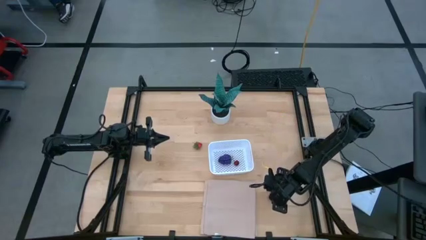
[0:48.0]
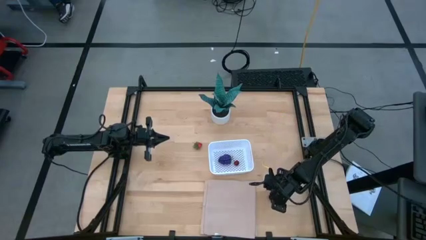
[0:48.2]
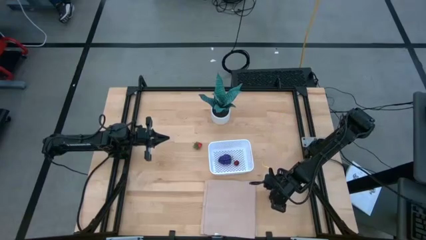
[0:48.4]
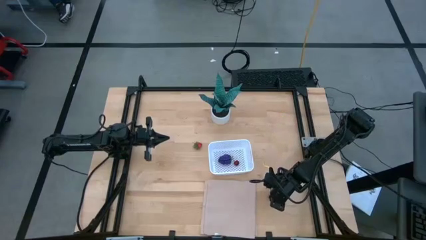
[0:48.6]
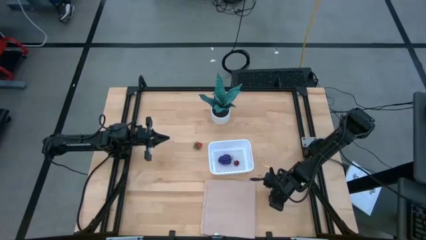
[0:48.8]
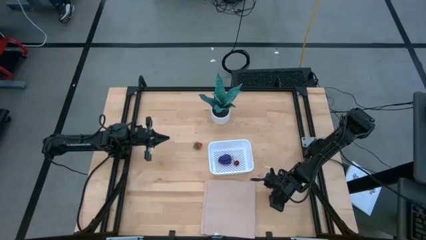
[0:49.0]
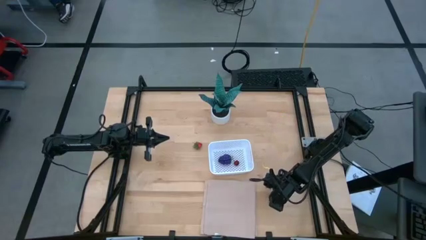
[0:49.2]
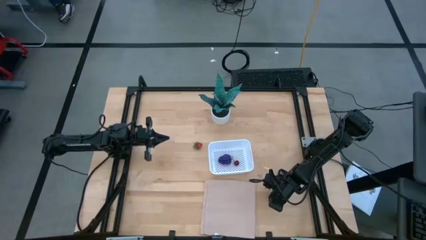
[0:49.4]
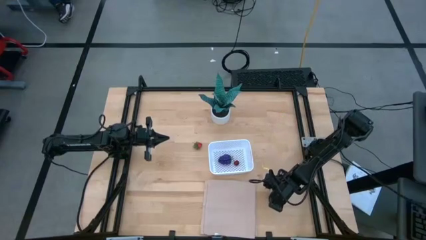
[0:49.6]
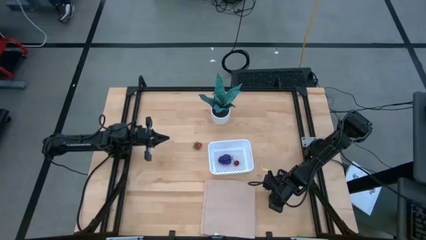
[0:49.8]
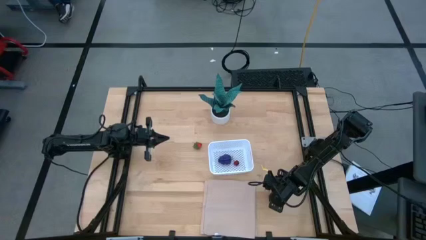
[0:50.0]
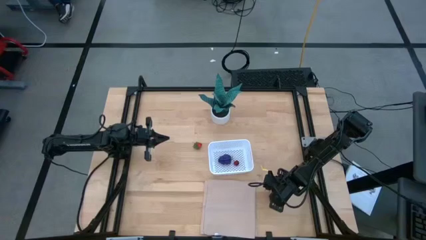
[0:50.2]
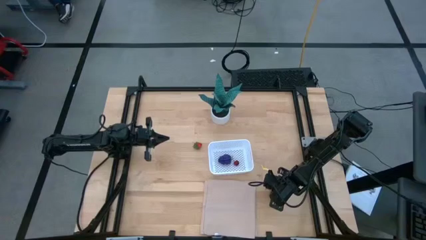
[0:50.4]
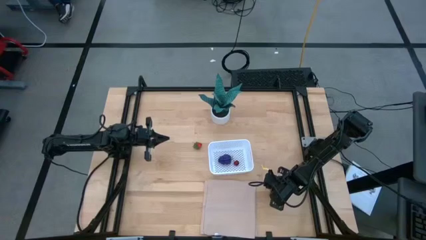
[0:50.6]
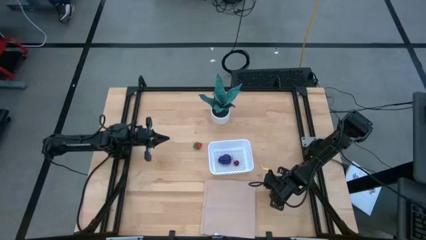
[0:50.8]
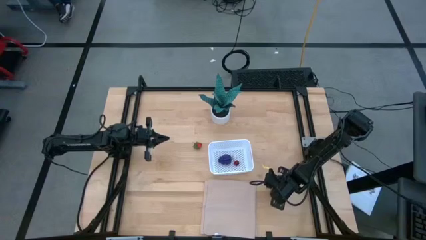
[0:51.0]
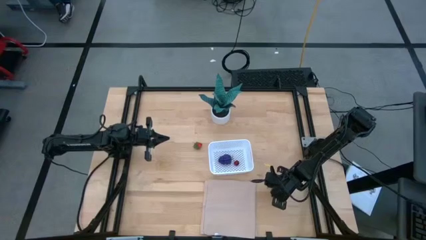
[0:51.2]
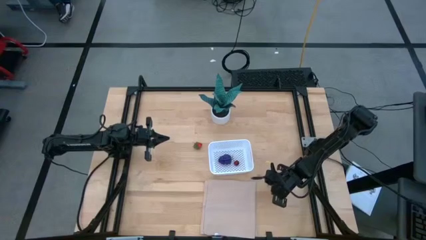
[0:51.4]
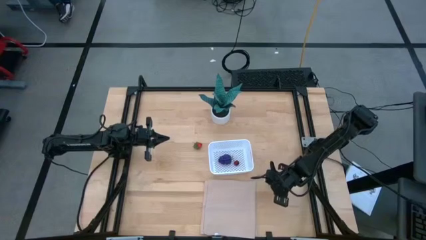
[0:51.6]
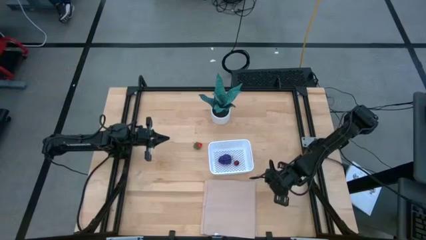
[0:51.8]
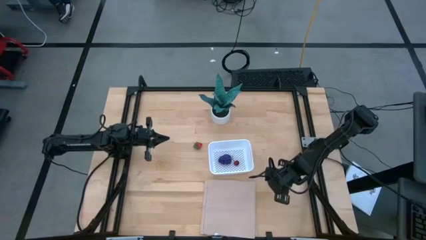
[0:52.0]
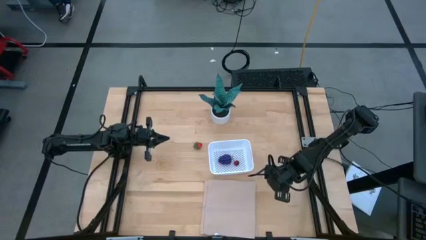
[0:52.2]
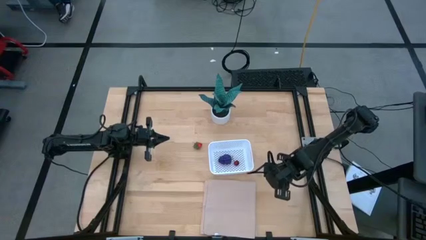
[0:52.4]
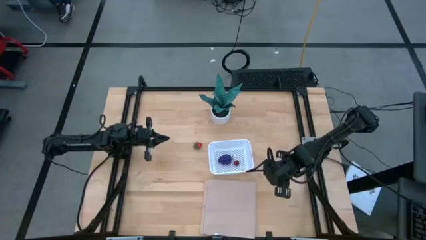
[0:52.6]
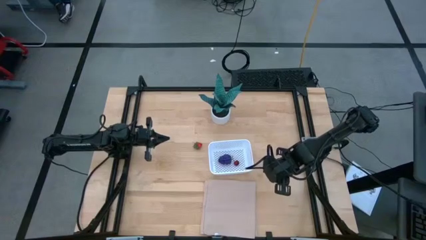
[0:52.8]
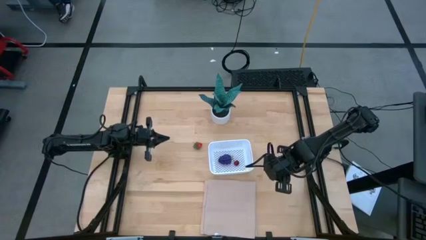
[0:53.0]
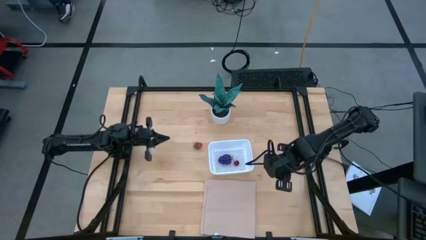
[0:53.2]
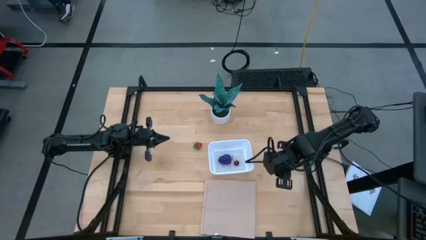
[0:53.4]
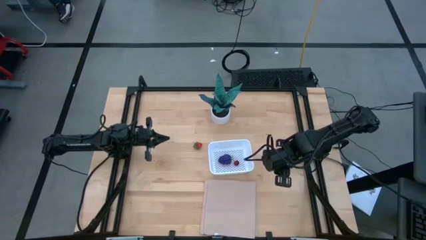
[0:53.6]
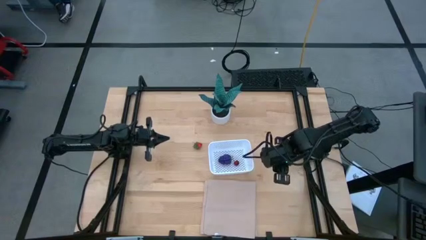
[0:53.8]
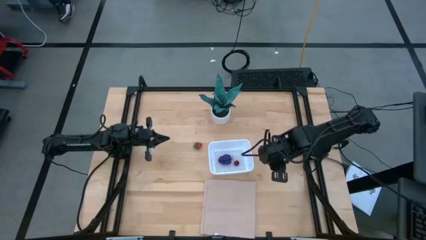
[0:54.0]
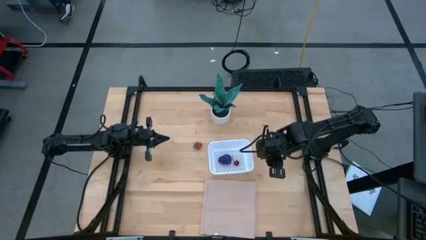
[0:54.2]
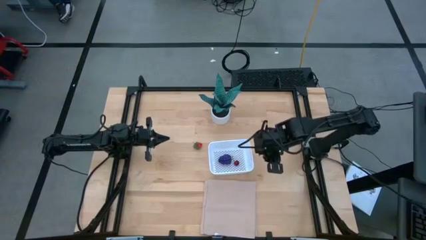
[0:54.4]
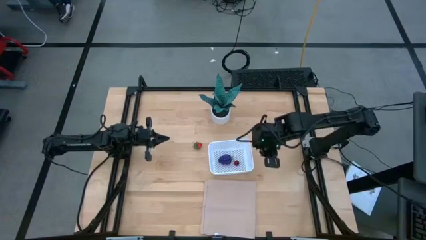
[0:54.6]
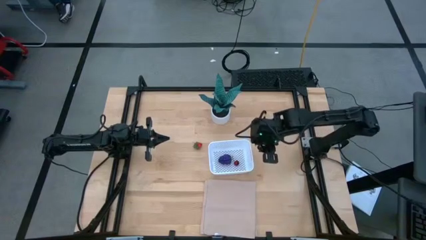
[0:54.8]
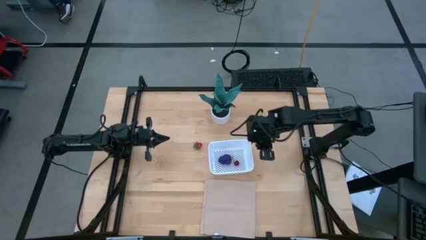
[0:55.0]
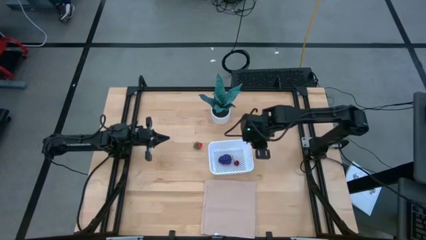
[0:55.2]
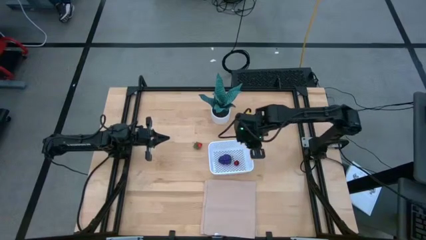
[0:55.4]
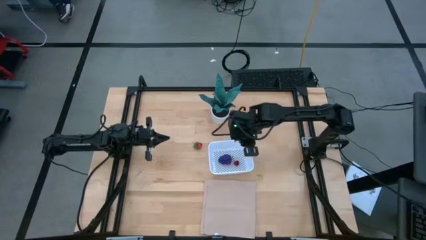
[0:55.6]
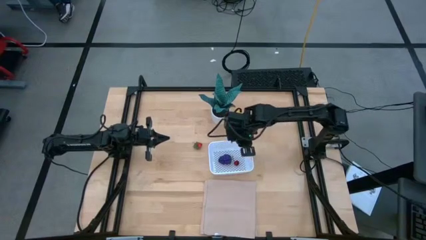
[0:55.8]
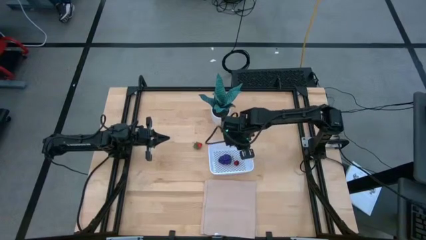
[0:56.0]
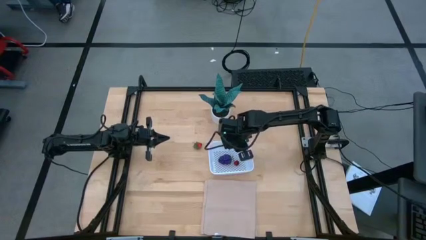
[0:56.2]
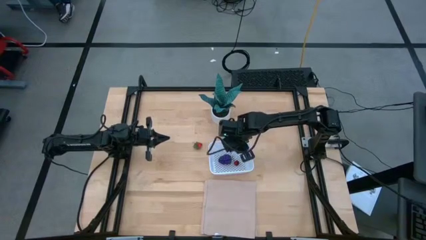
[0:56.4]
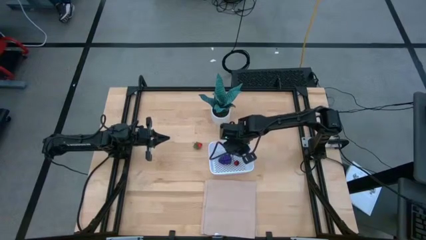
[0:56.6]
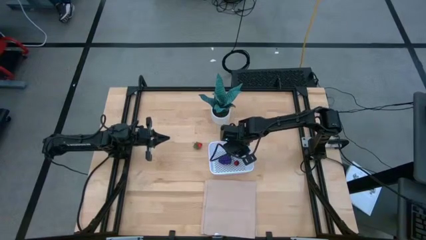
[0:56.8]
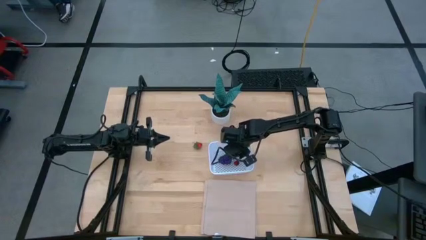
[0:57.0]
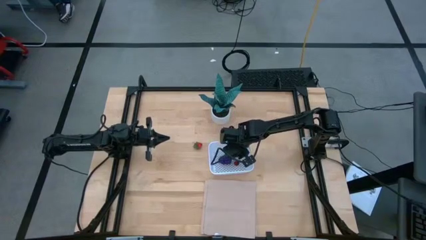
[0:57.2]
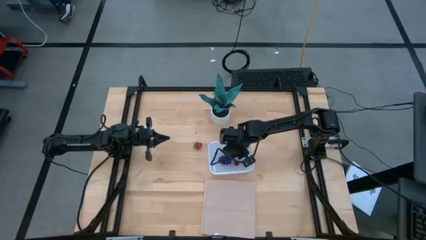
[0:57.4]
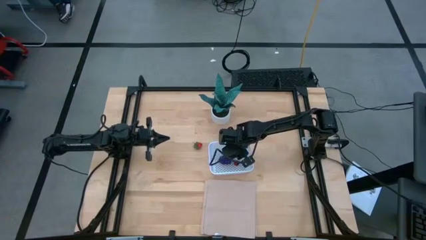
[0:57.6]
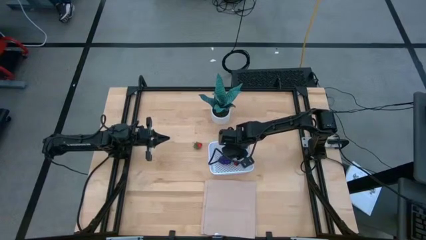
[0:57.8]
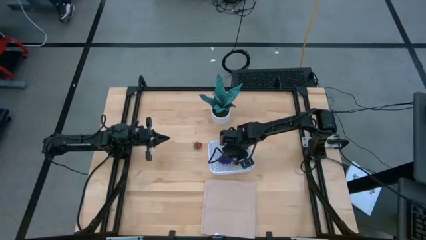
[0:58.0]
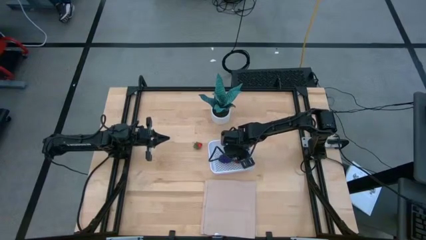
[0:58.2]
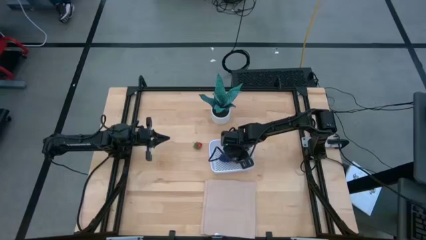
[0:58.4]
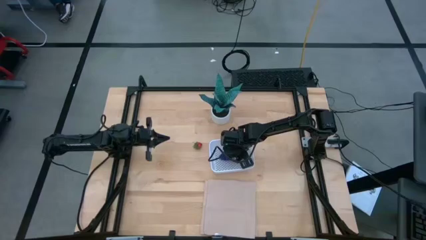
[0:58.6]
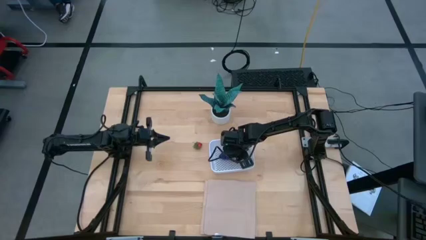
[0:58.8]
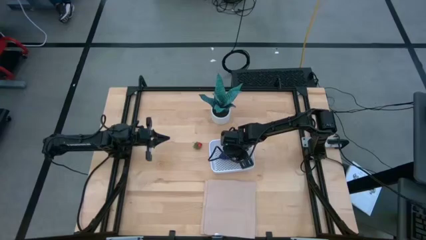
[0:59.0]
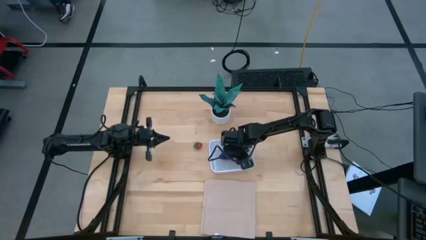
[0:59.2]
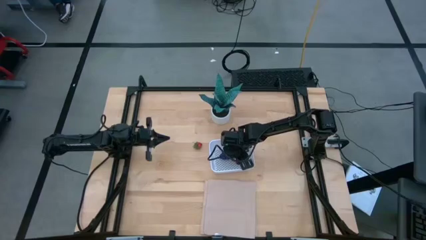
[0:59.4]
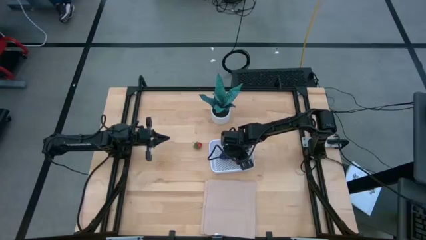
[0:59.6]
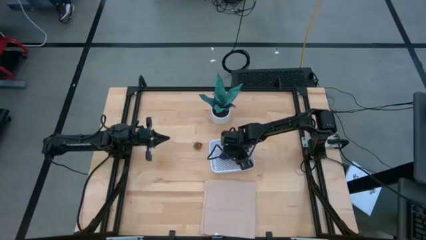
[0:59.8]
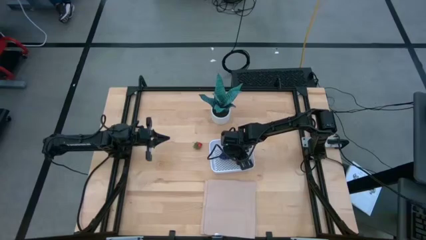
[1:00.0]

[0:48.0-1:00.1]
Task: Pick and placing Produce into tupperware
Put the black cherry into the basket
